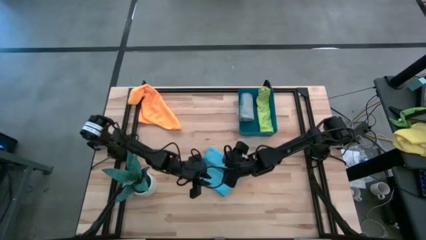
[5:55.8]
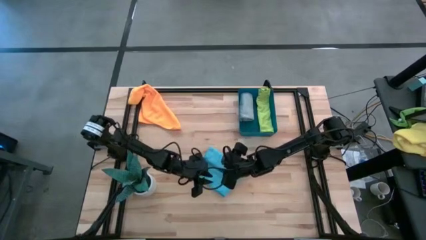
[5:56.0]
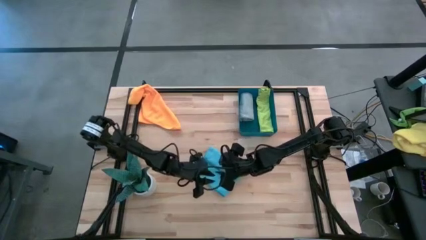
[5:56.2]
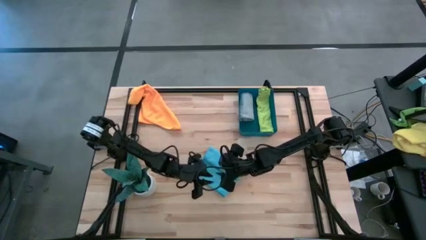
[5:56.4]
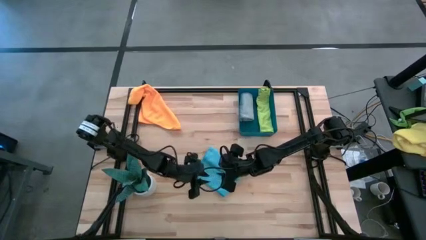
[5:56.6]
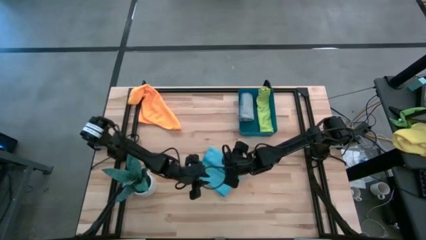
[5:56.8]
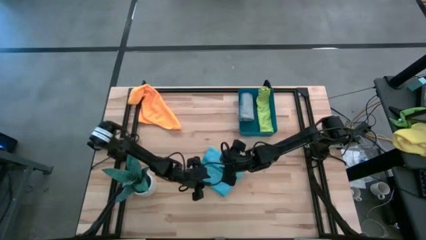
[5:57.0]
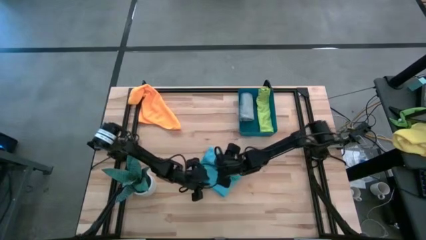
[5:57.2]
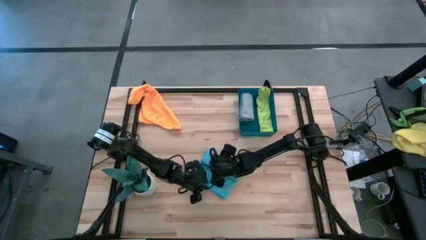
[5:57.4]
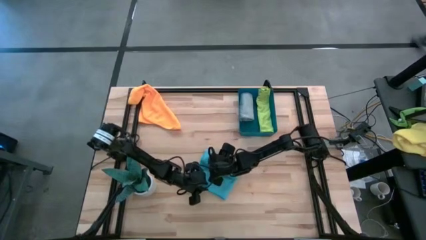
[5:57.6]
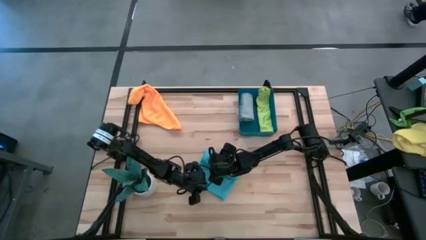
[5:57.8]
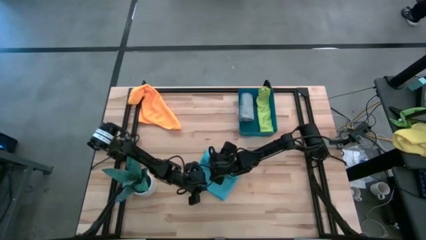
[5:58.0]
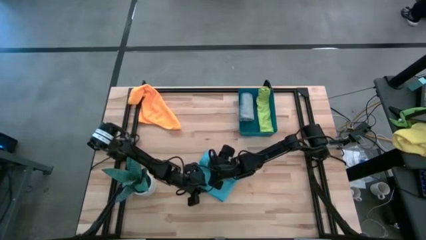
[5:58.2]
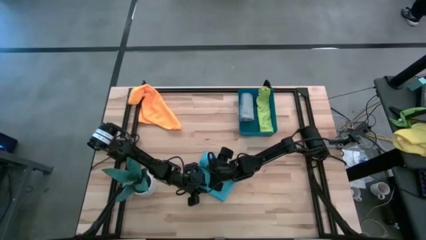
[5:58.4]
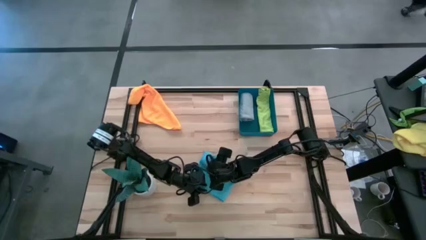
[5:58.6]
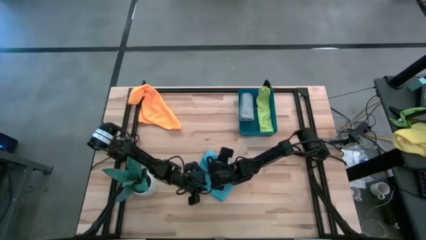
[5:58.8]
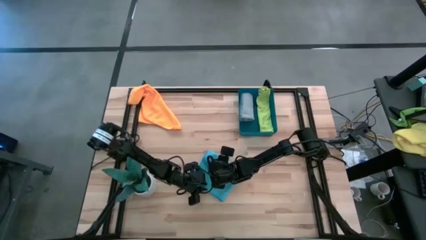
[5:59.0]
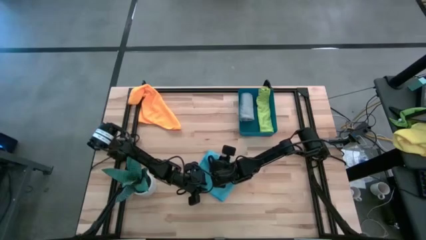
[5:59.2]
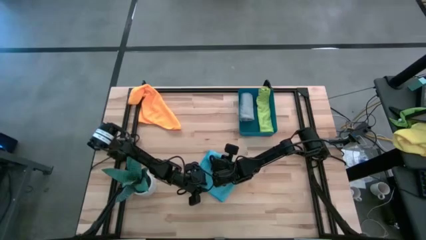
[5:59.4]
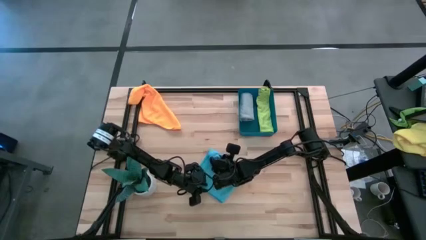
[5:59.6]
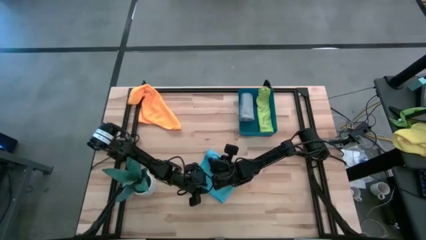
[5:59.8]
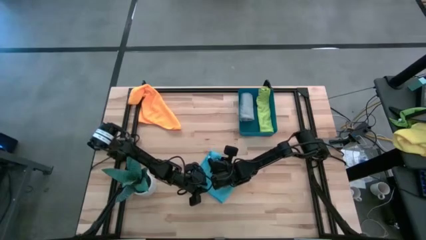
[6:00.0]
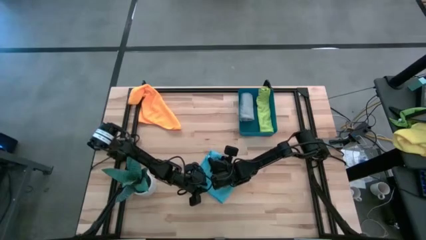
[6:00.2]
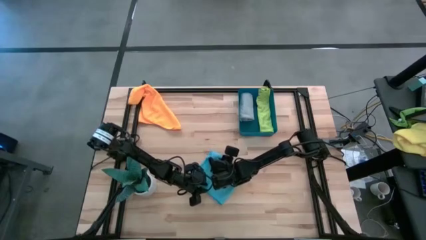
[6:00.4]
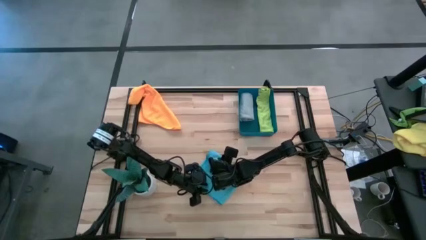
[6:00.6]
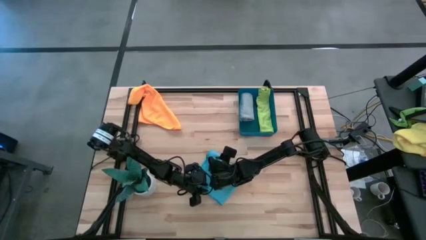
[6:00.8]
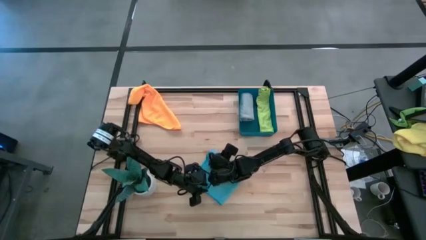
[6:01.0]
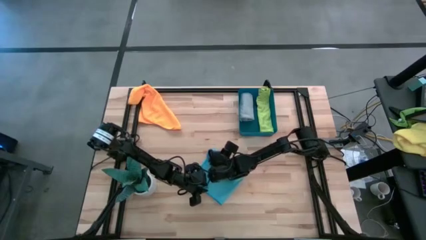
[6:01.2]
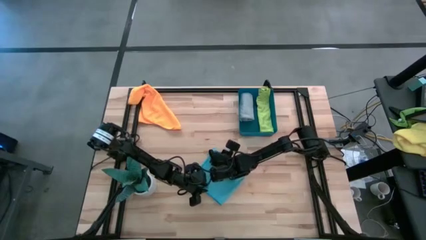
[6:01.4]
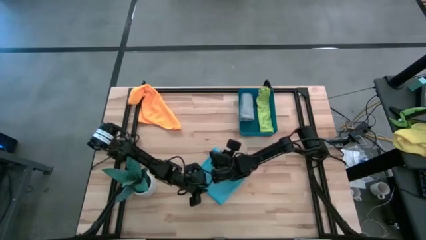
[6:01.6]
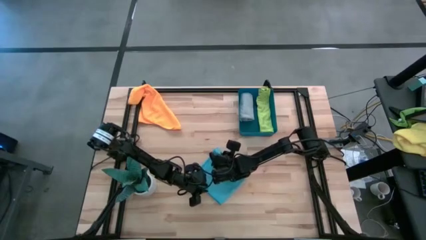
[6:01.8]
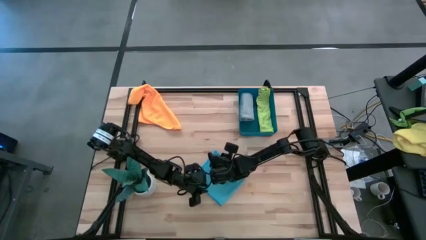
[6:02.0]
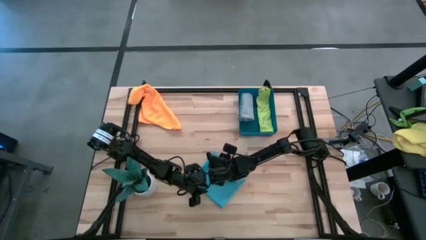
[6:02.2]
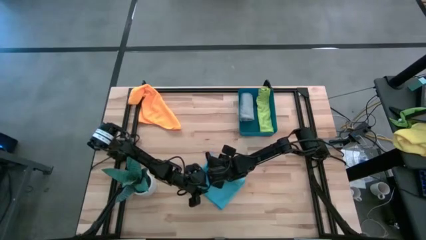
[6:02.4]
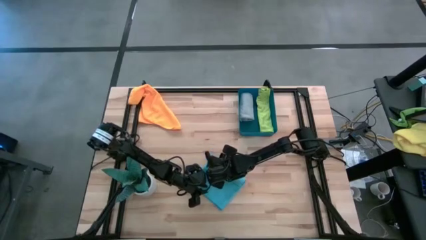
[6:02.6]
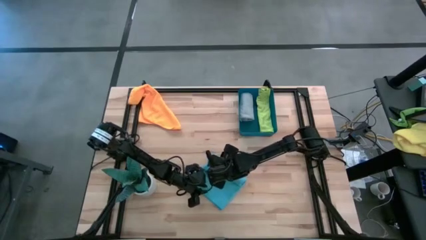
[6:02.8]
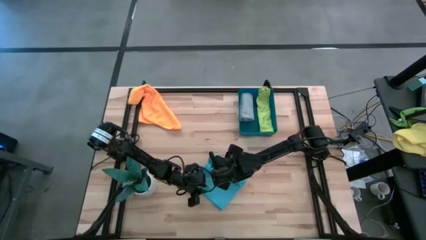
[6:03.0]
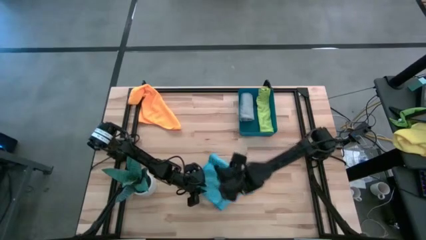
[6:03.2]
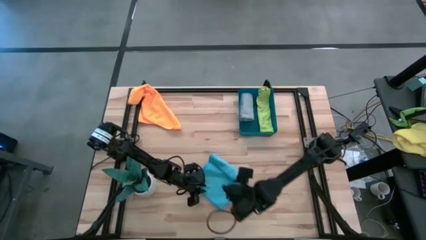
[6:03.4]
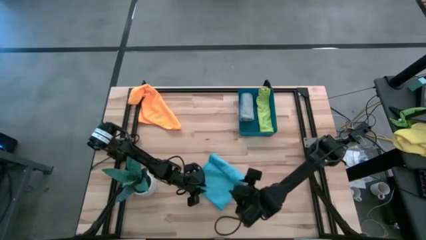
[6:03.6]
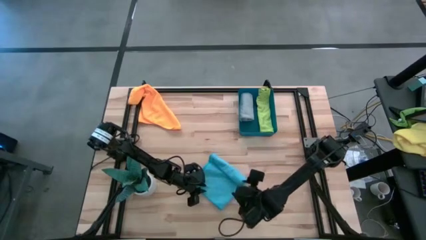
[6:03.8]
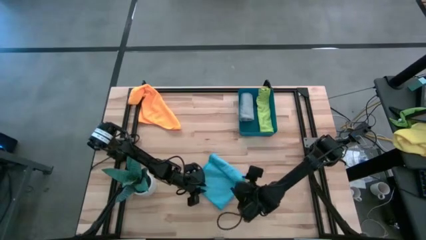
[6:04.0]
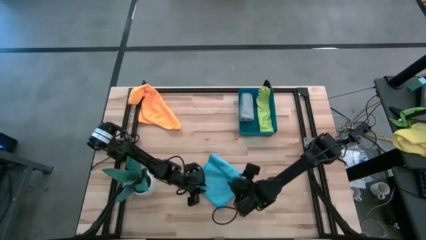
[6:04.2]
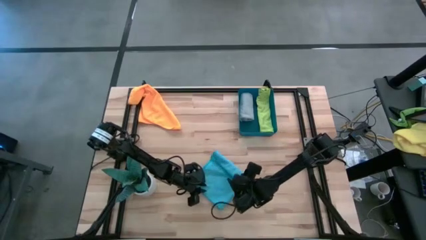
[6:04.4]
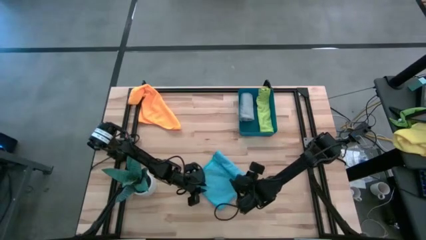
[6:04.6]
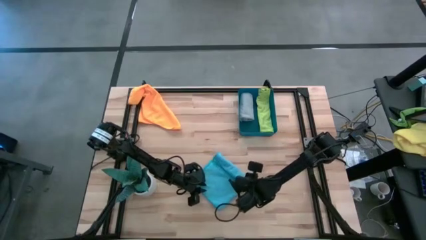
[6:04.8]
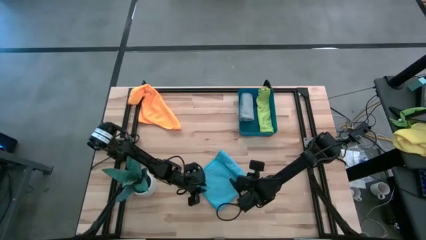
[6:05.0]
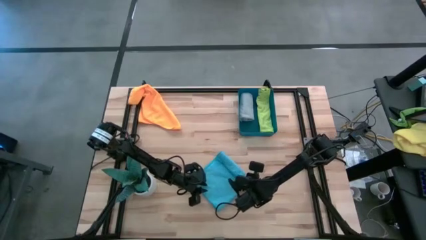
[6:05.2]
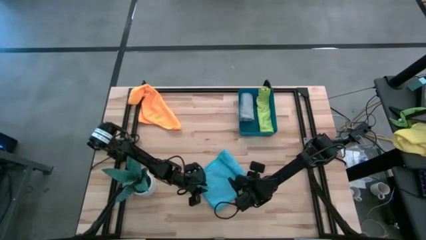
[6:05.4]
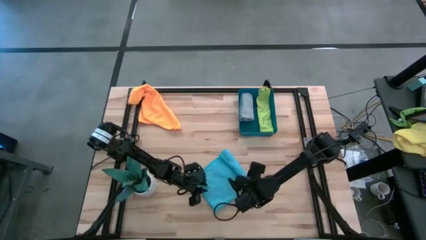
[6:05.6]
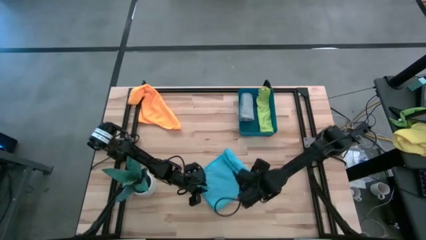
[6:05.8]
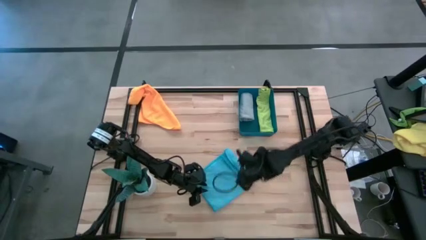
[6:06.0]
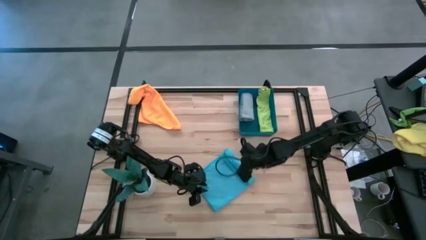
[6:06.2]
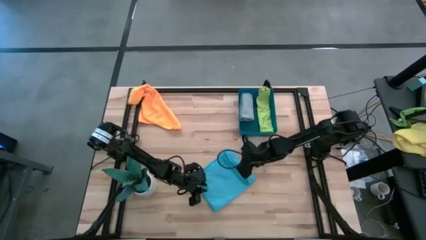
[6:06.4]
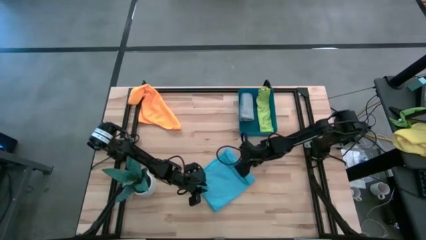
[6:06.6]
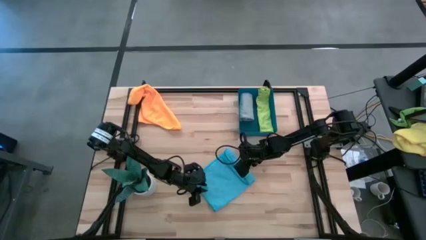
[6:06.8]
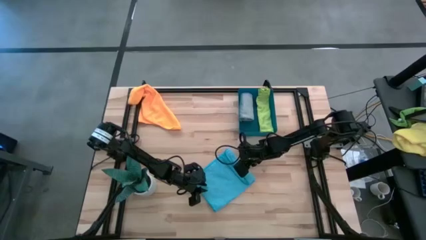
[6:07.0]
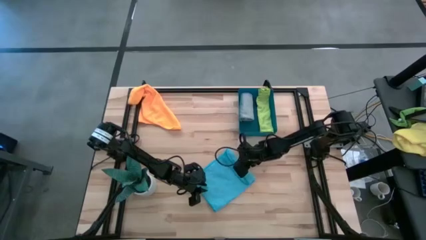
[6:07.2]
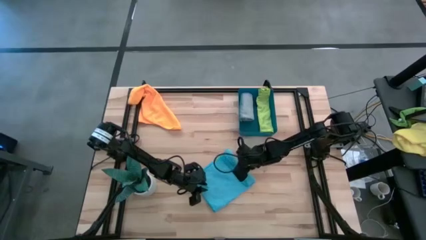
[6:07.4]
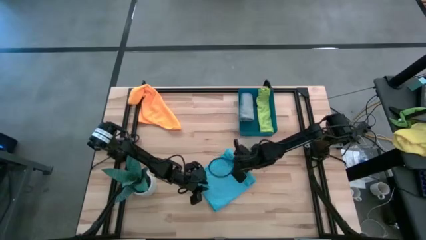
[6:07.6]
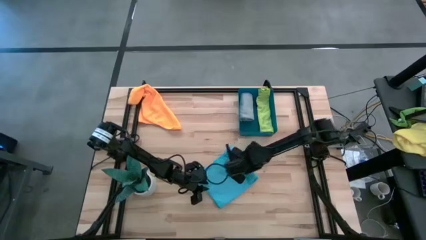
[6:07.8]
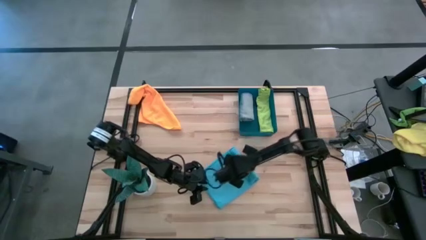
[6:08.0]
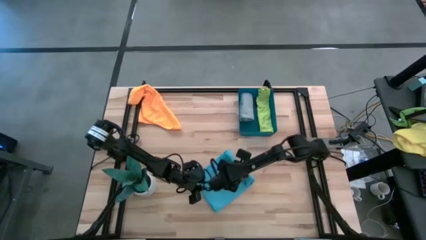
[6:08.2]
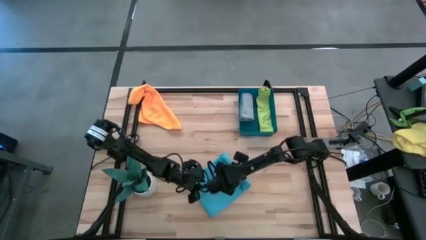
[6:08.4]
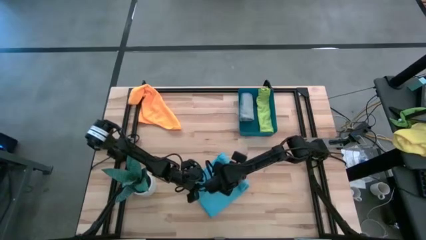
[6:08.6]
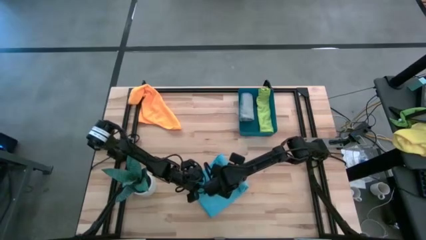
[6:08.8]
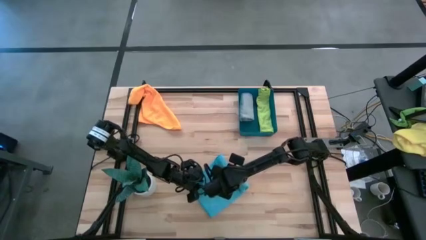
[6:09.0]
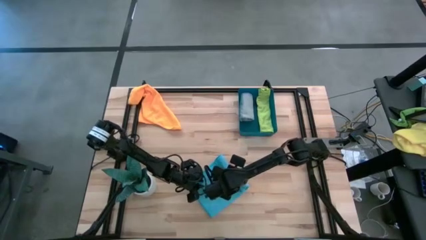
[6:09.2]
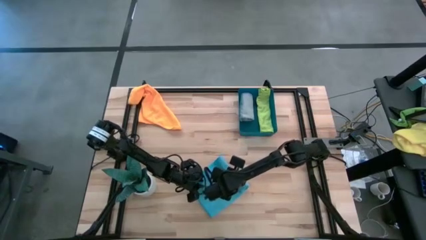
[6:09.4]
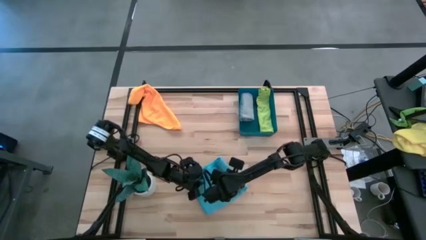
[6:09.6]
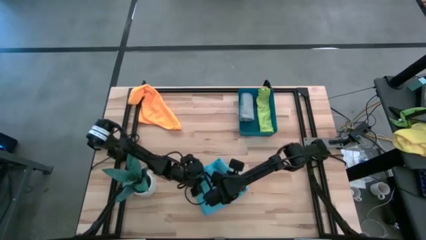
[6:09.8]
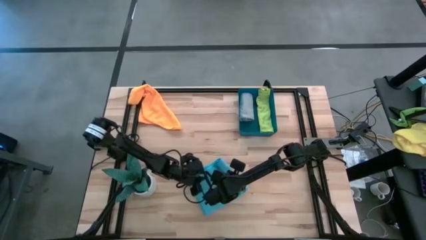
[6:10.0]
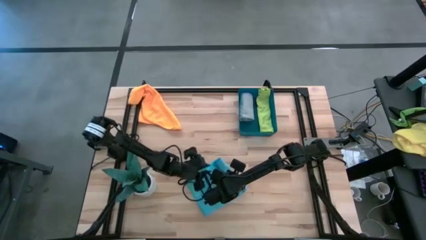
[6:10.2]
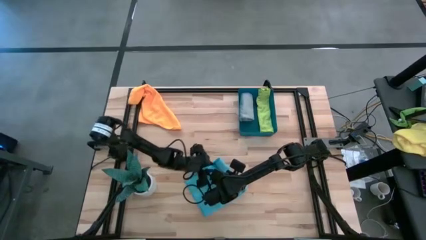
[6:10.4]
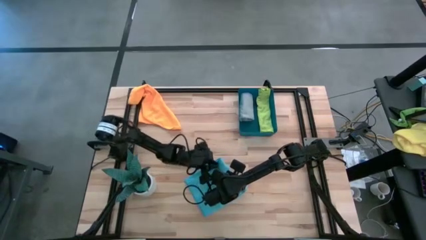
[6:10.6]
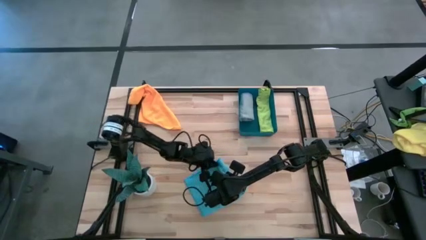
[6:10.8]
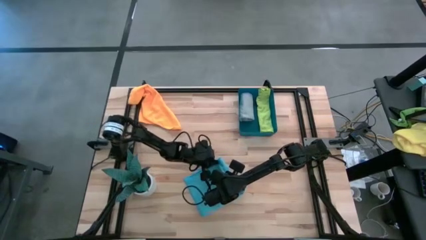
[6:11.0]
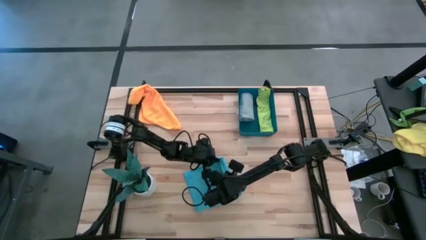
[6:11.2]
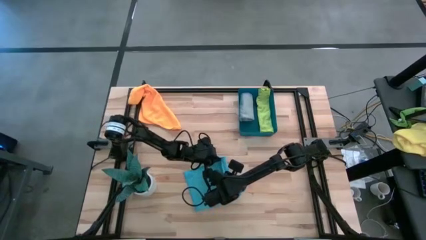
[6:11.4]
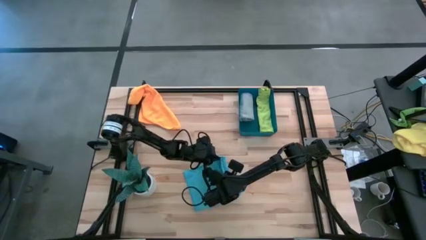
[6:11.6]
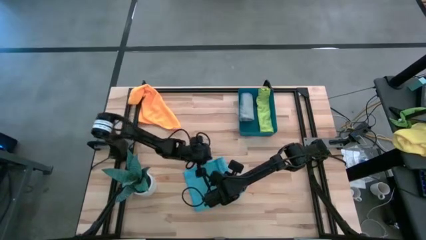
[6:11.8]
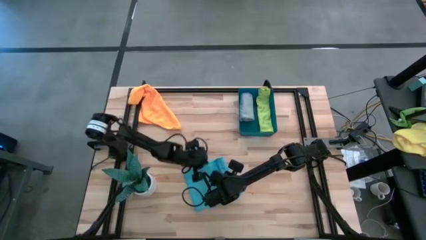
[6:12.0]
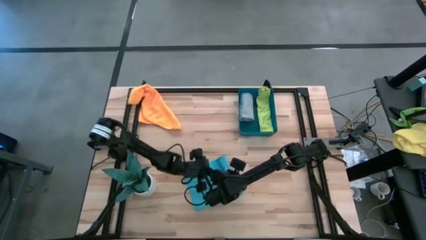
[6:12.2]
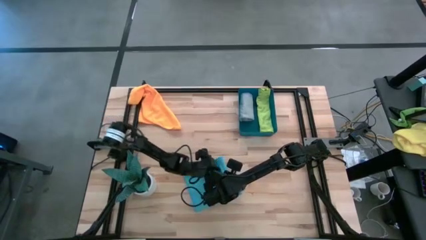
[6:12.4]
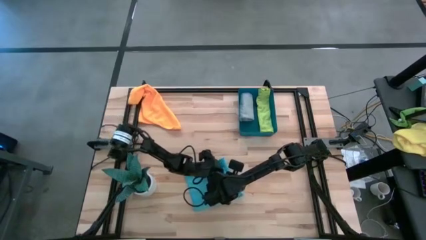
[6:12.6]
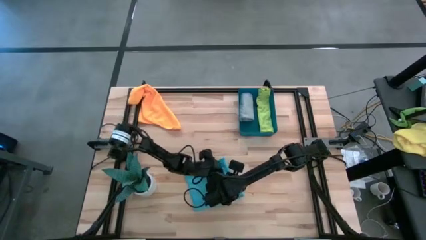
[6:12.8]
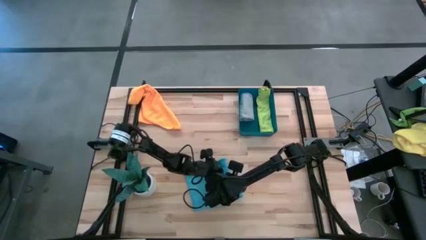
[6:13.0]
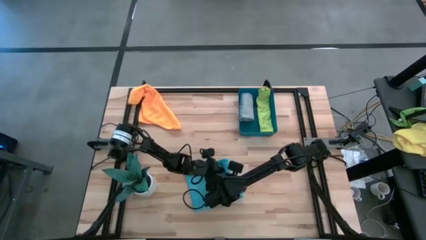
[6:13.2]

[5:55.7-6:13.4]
Task: Roll microfiber towels into tight, uniform cylinder then place into a basket
Roll the blue towel
